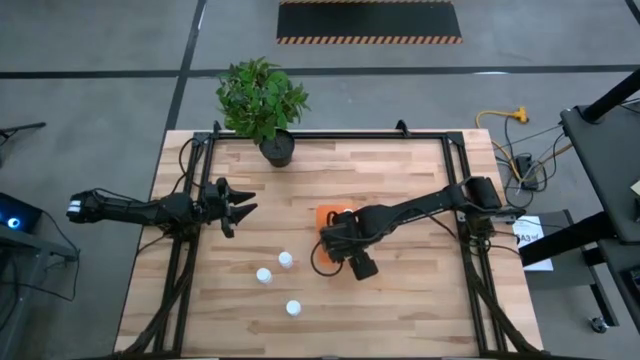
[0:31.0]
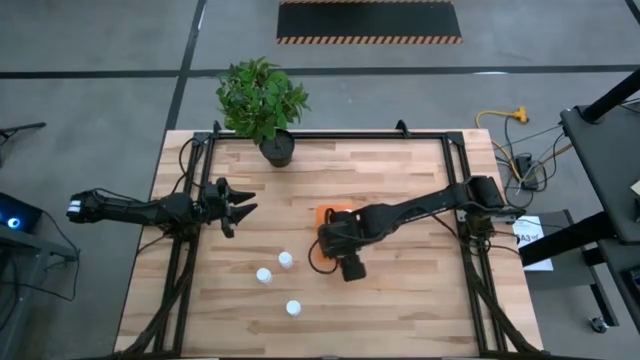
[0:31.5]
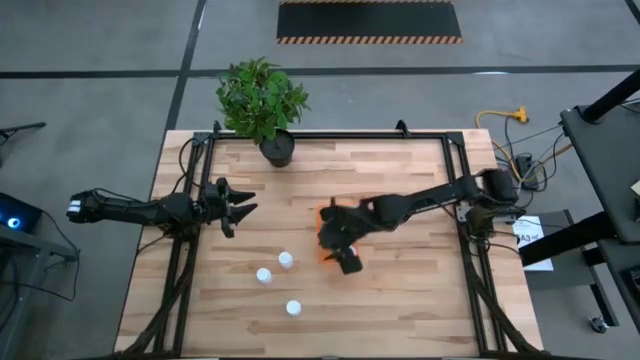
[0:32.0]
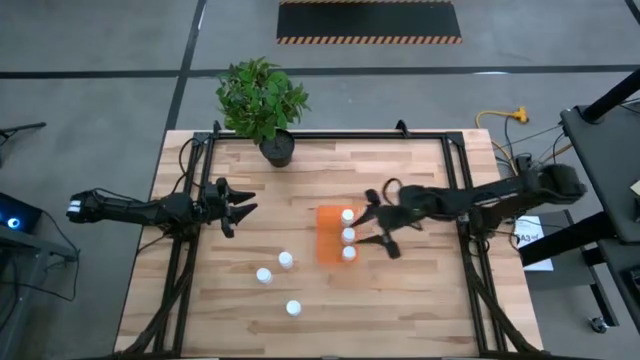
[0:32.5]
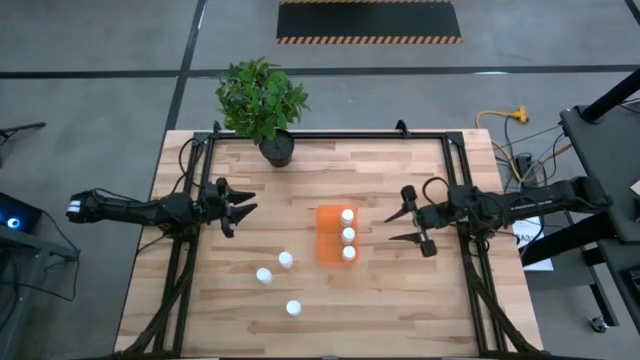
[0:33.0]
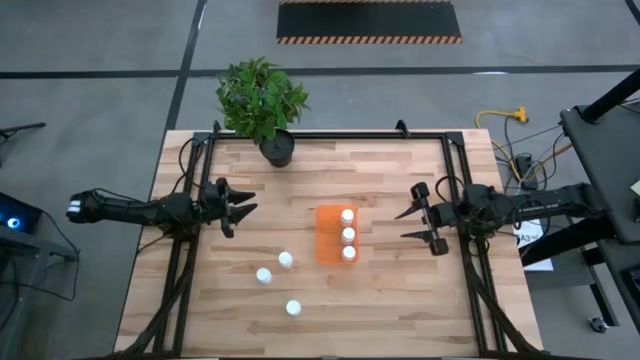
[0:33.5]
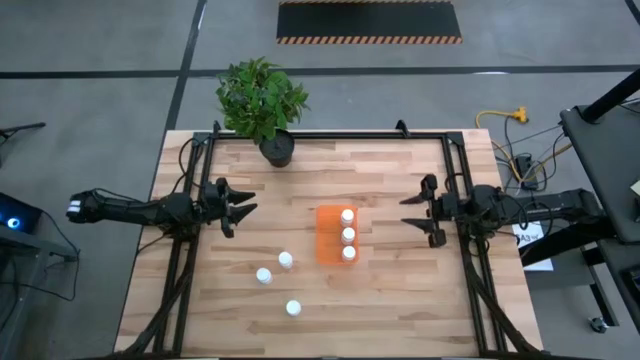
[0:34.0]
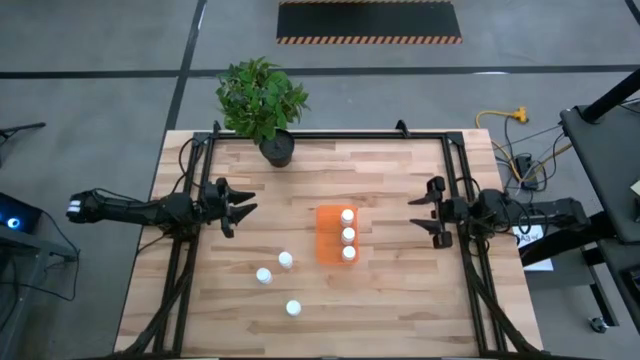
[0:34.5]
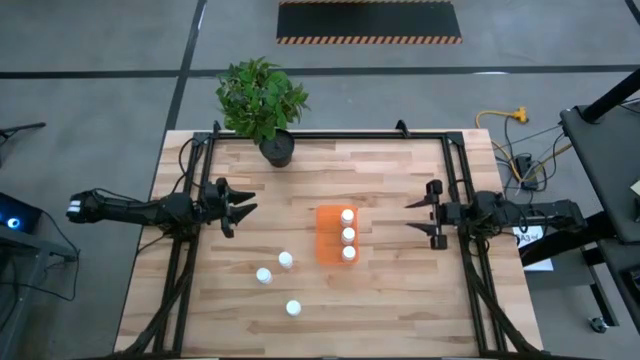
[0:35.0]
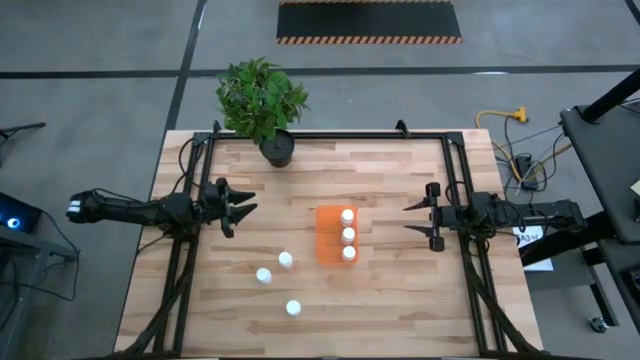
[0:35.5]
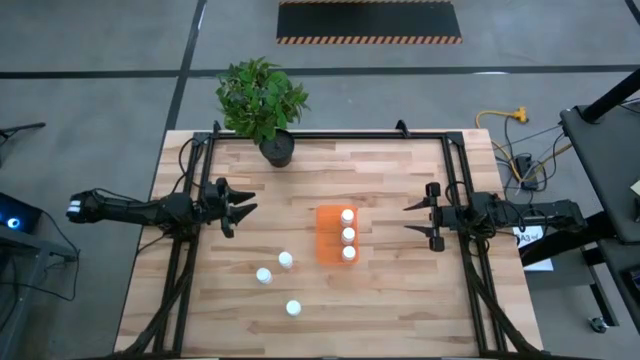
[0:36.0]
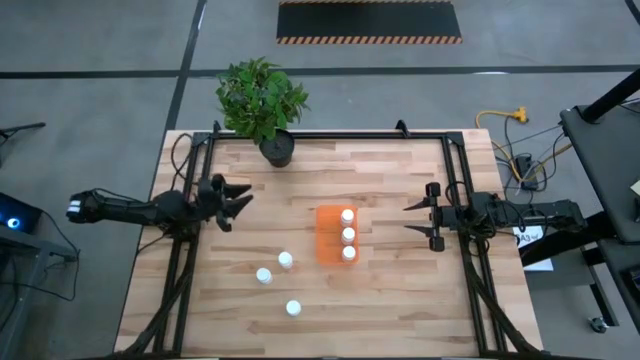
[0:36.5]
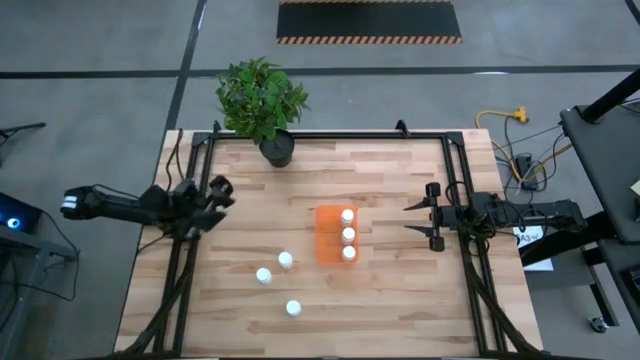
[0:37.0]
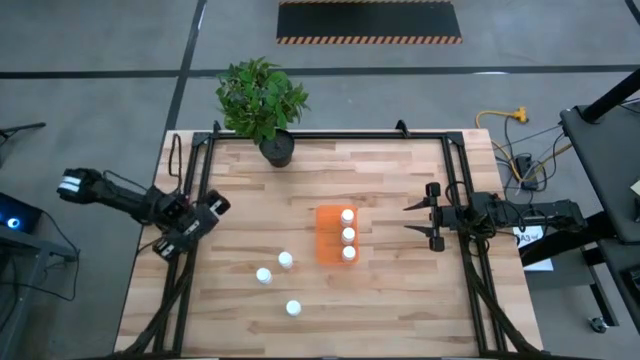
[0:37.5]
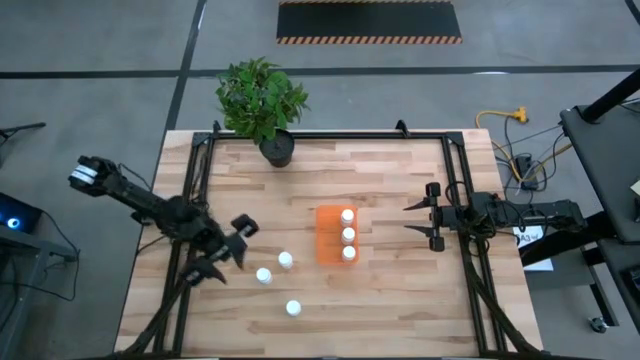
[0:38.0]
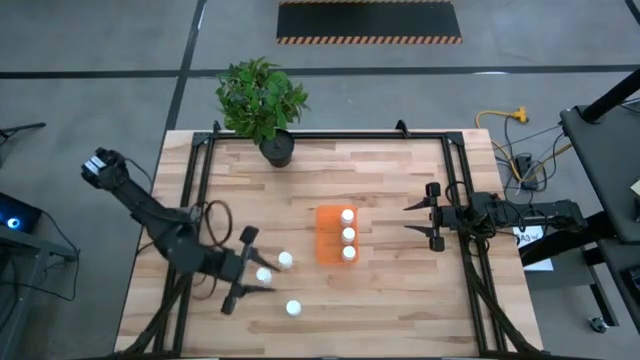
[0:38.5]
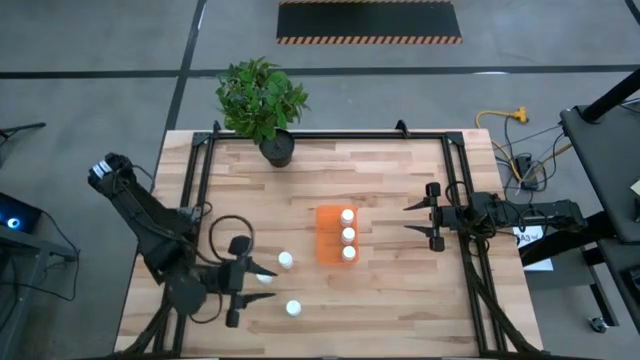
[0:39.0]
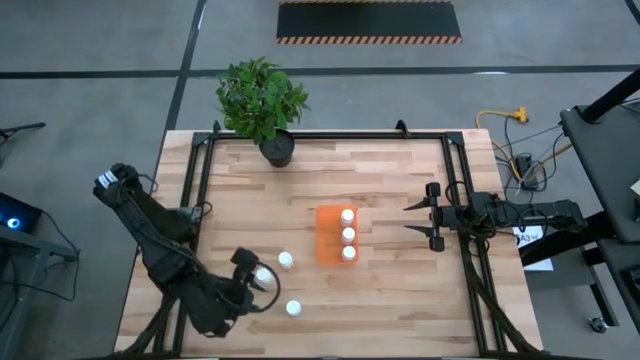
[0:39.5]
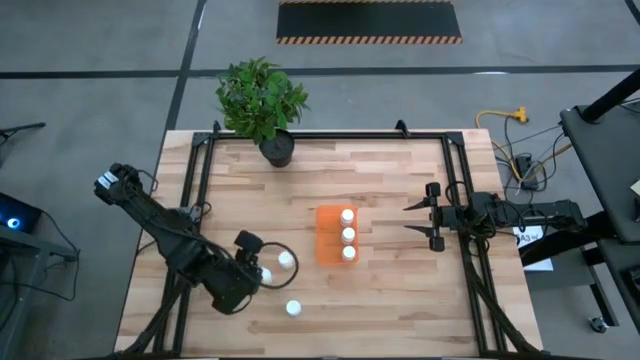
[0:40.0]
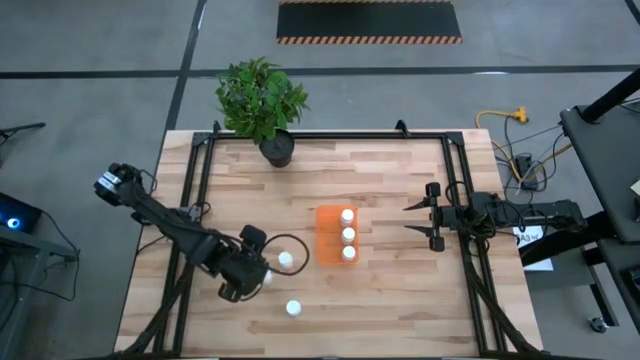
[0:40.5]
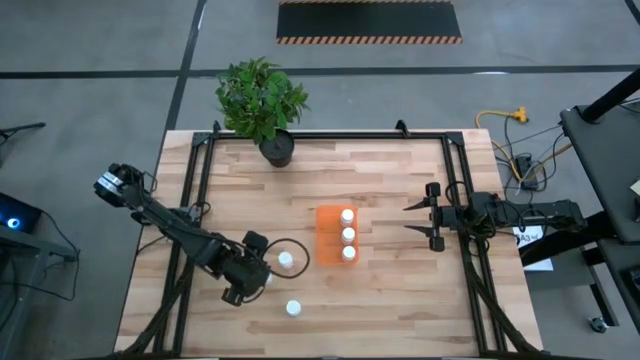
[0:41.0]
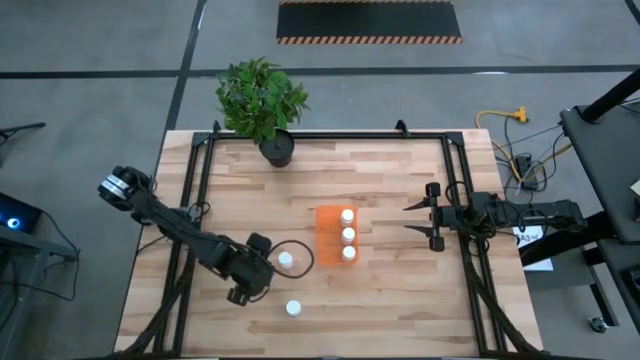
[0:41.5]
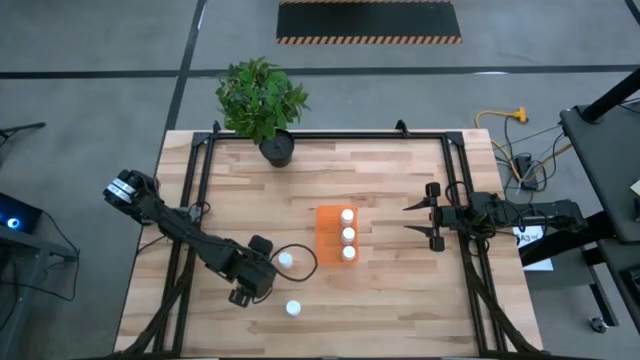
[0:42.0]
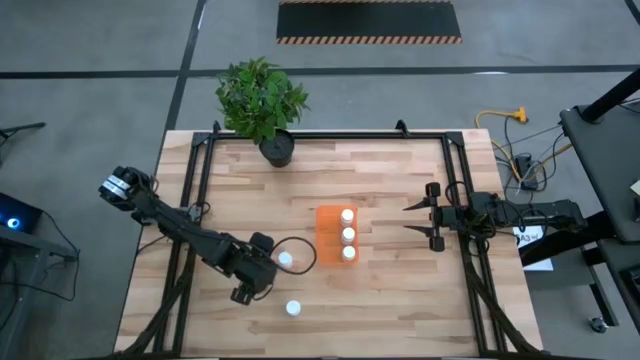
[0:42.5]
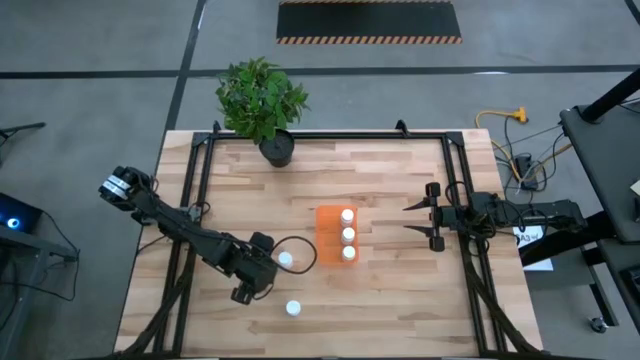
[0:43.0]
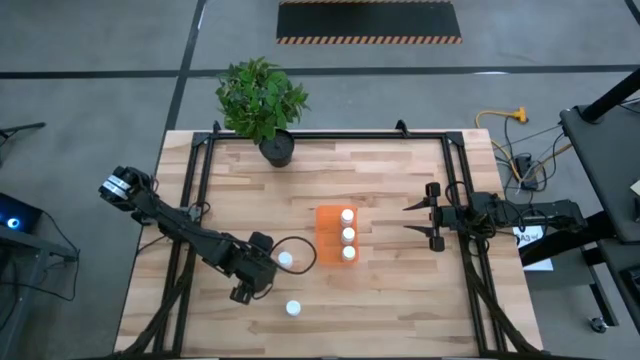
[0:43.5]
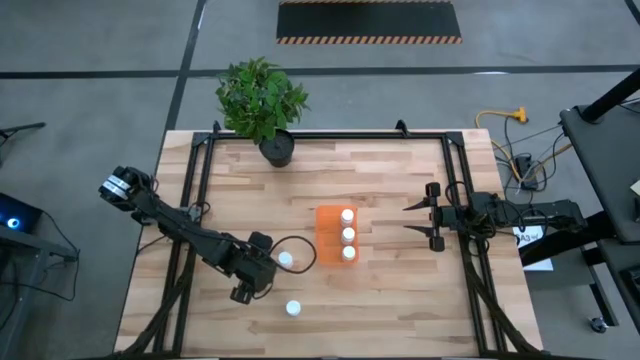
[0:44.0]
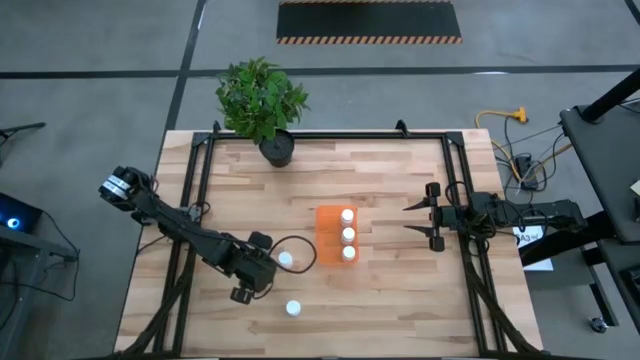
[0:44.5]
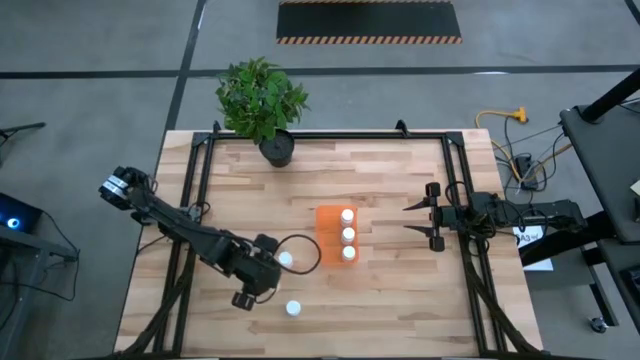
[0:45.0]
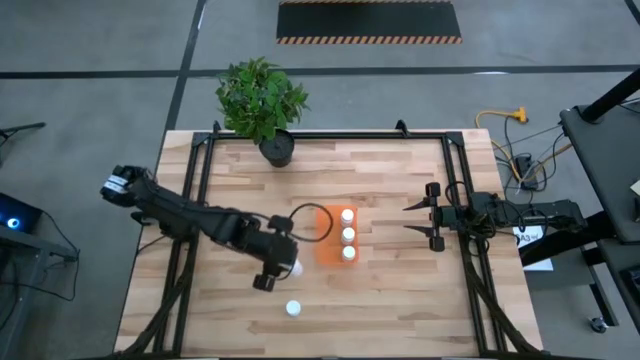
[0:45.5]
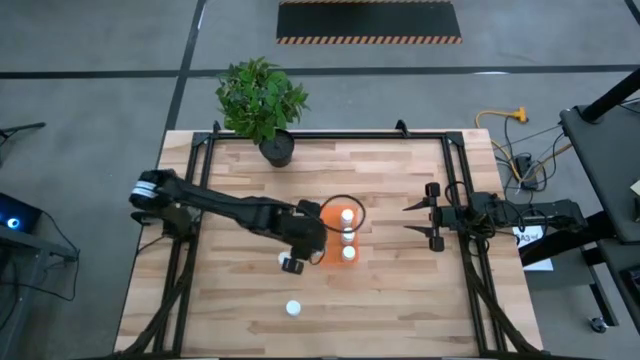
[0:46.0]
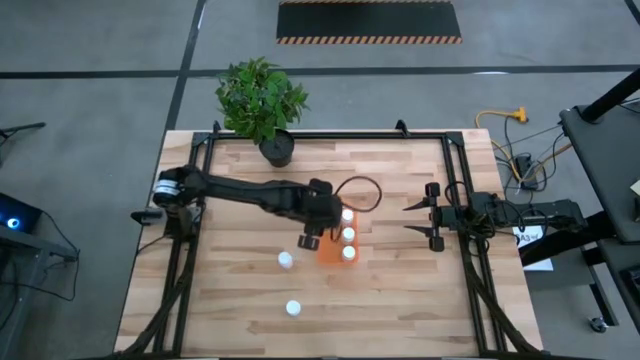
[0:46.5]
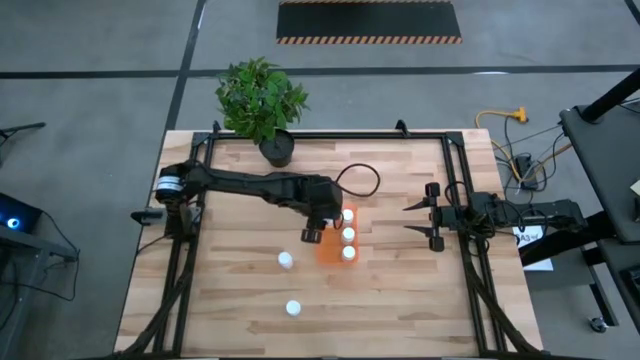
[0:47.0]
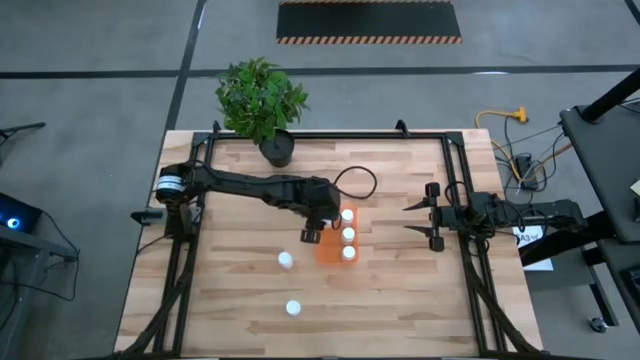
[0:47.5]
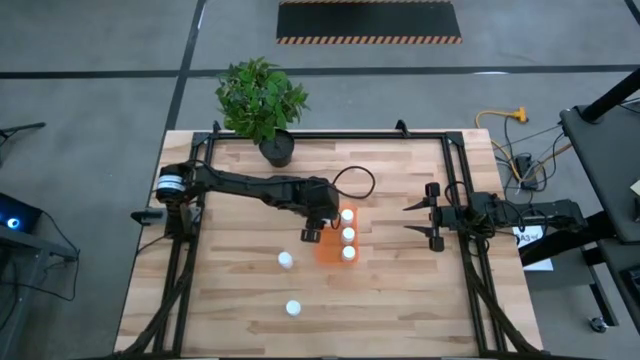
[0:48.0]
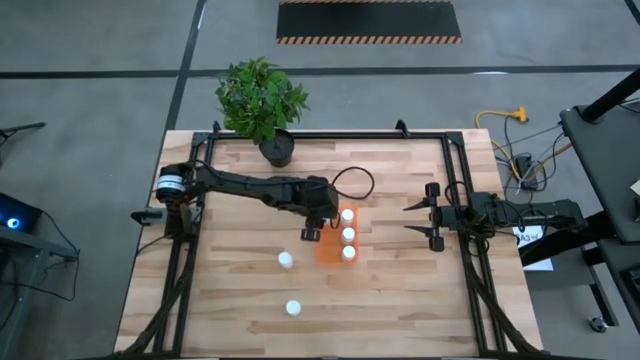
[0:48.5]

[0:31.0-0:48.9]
Task: Pick and place pill bottles into a basket
Put the white pill bottle into the orange bin

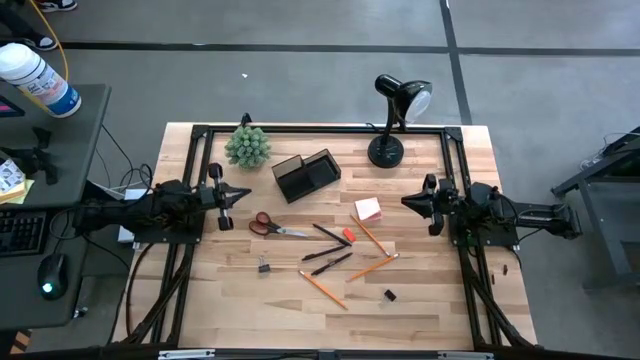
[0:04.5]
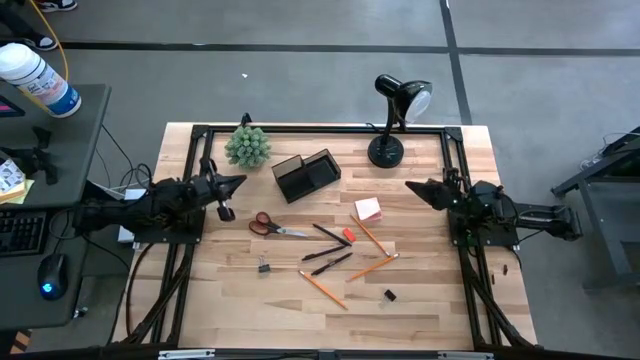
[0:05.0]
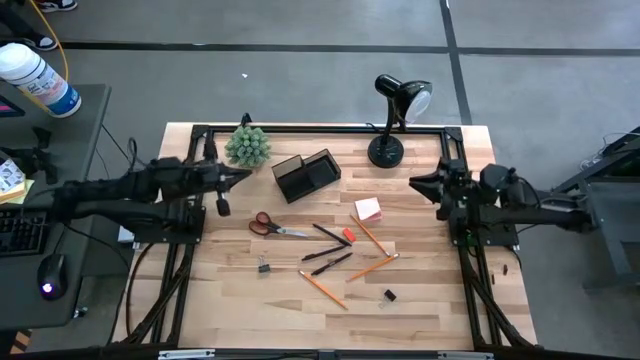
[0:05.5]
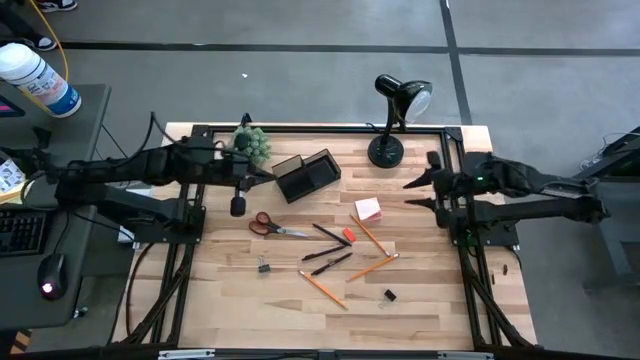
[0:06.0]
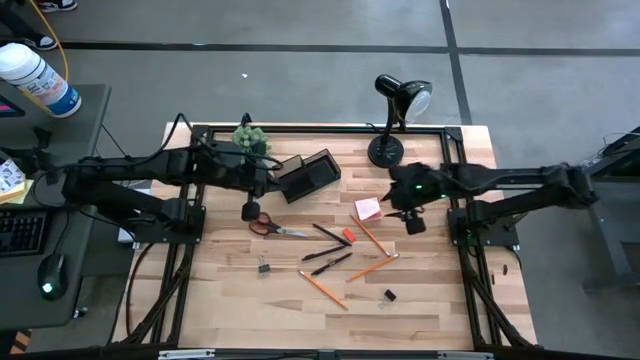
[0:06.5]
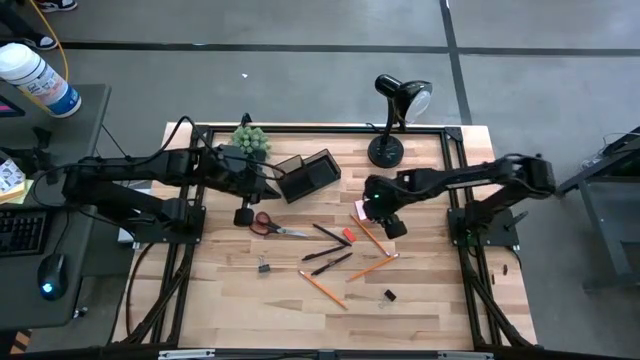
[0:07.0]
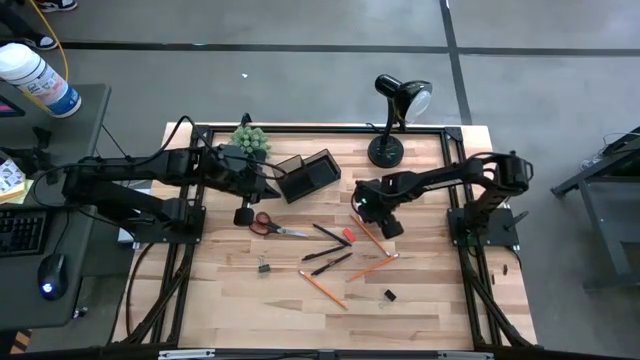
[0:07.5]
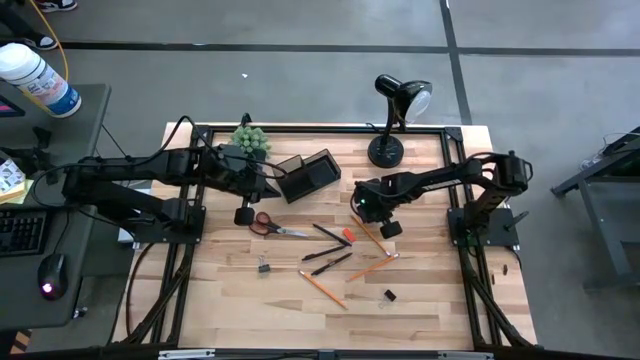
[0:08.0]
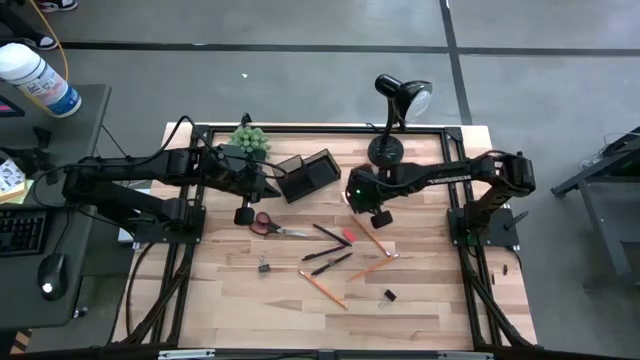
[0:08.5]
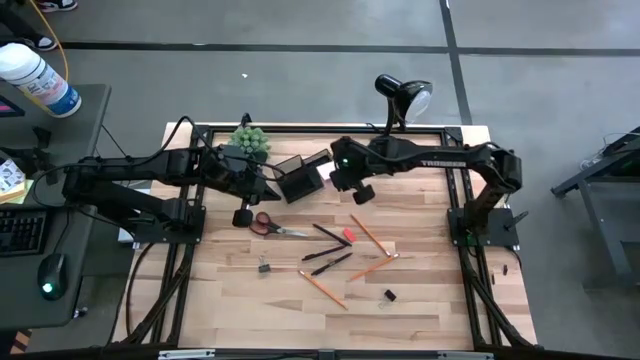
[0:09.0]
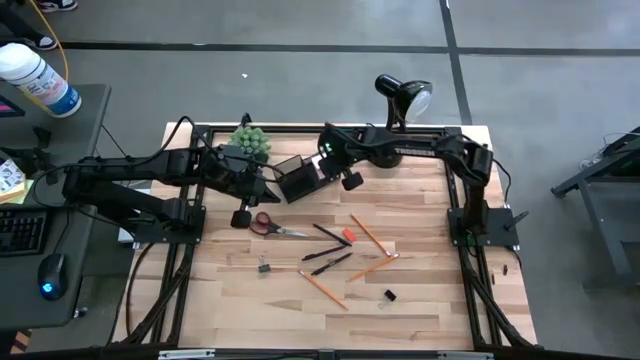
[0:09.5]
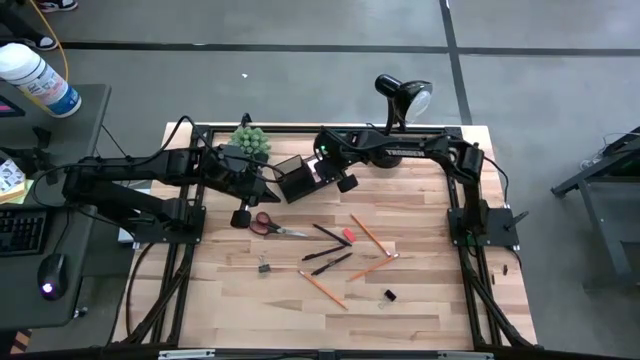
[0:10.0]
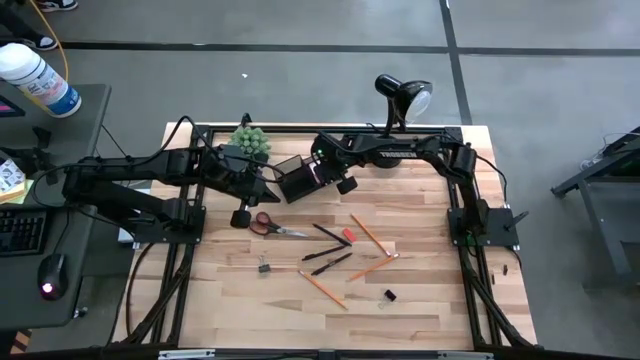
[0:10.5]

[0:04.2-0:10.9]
Task: Pick and place office supplies into organizer
Put the pink sticky note into the black desk organizer
